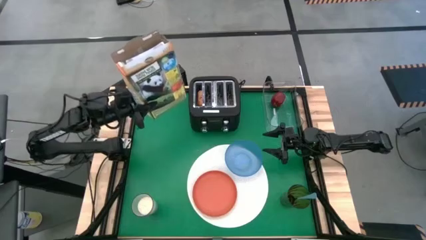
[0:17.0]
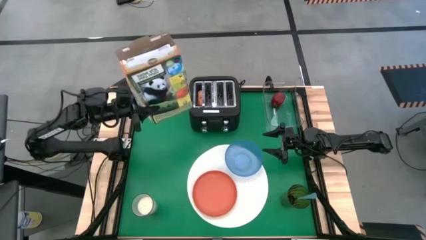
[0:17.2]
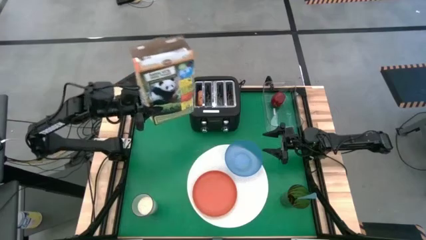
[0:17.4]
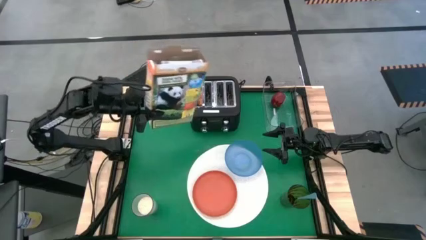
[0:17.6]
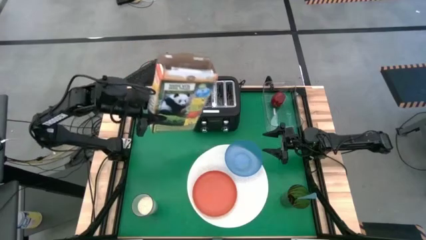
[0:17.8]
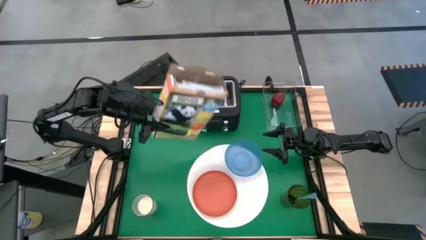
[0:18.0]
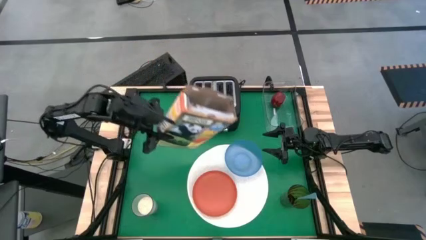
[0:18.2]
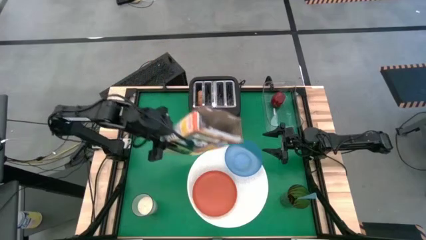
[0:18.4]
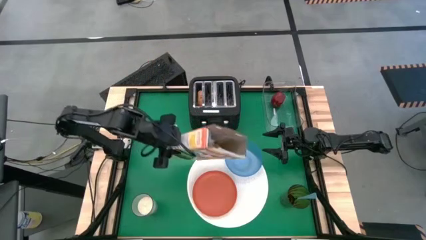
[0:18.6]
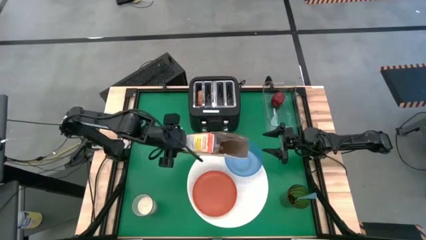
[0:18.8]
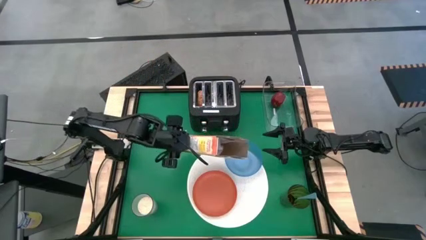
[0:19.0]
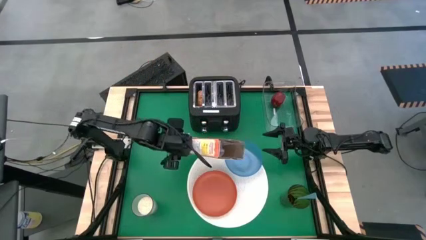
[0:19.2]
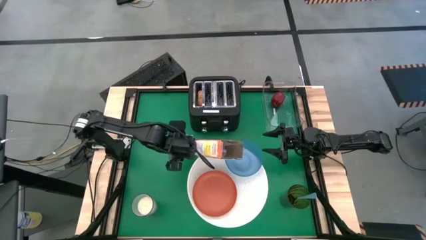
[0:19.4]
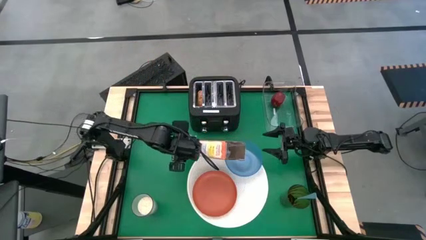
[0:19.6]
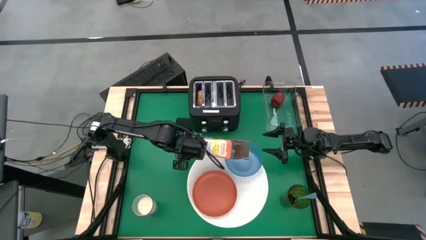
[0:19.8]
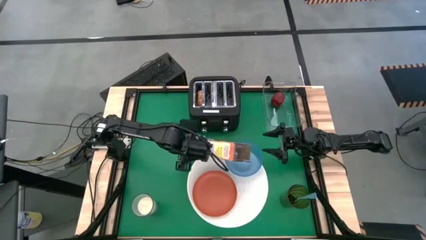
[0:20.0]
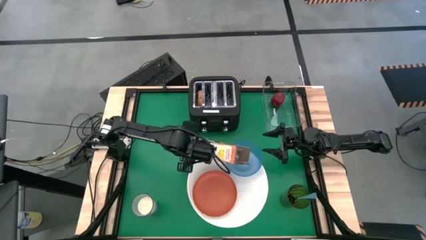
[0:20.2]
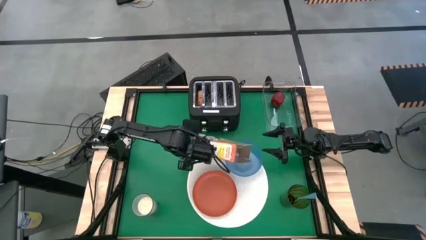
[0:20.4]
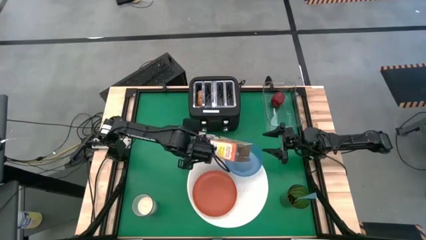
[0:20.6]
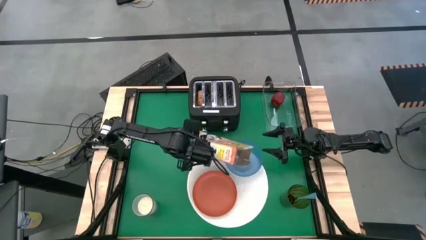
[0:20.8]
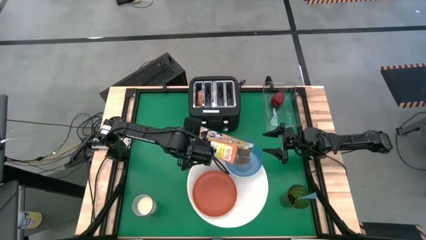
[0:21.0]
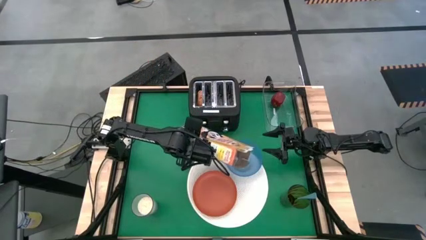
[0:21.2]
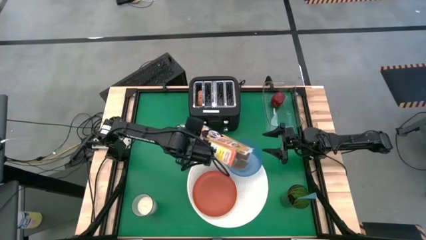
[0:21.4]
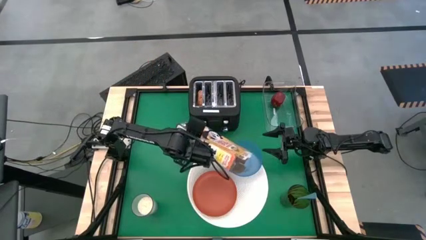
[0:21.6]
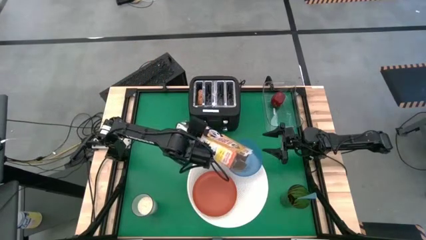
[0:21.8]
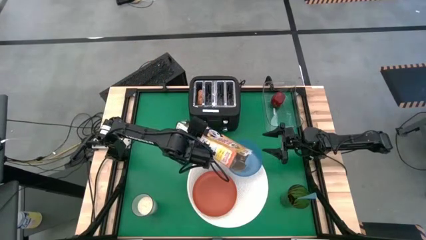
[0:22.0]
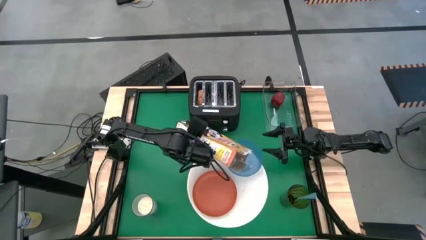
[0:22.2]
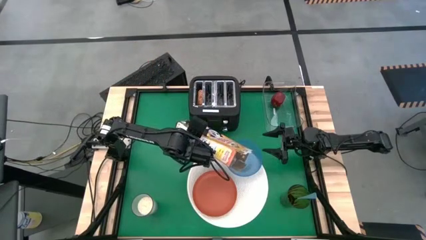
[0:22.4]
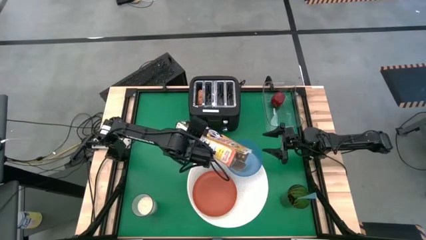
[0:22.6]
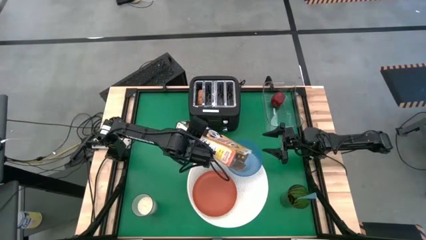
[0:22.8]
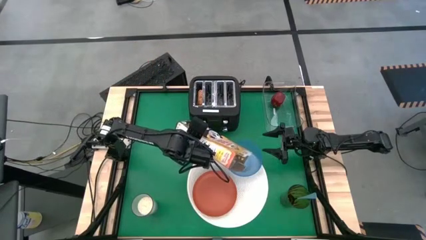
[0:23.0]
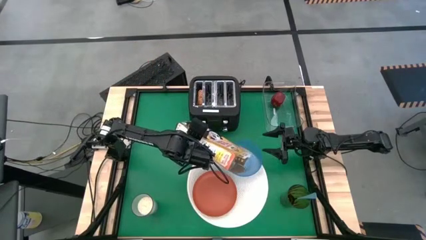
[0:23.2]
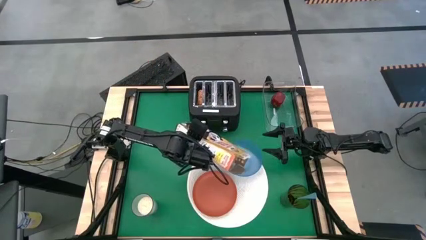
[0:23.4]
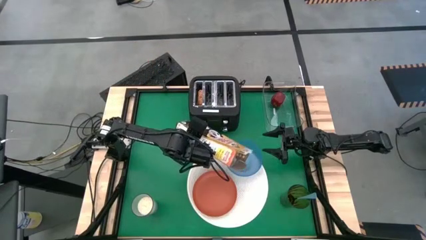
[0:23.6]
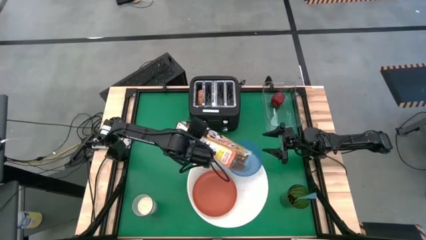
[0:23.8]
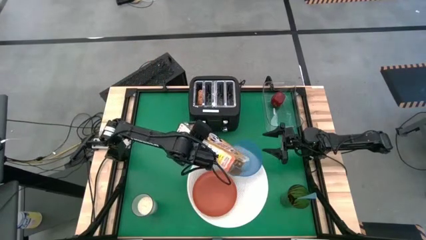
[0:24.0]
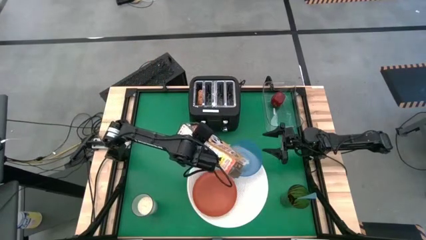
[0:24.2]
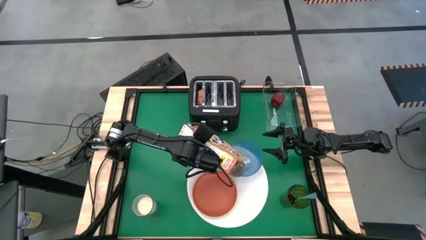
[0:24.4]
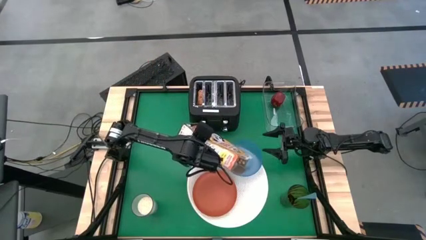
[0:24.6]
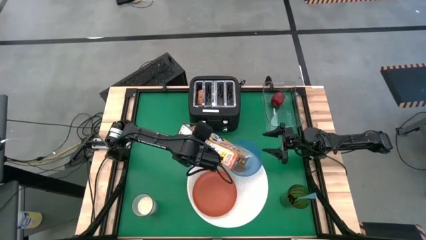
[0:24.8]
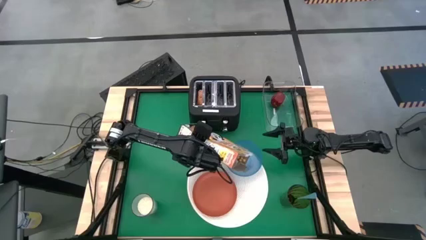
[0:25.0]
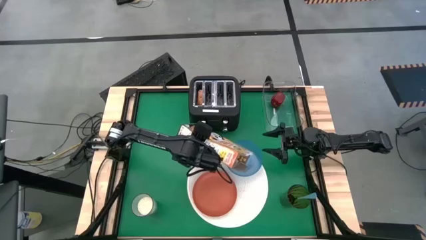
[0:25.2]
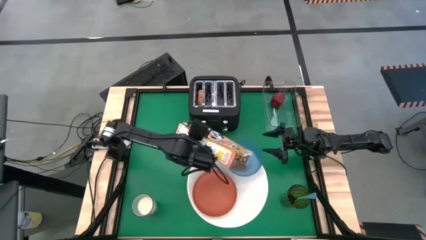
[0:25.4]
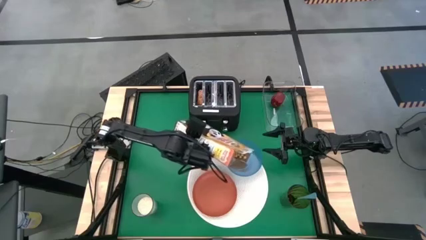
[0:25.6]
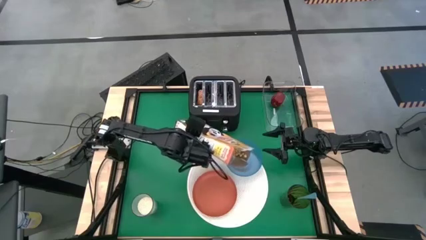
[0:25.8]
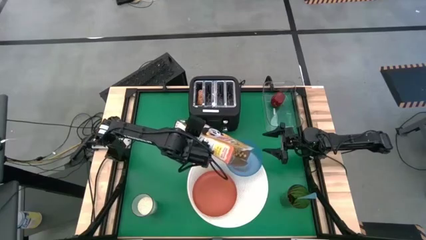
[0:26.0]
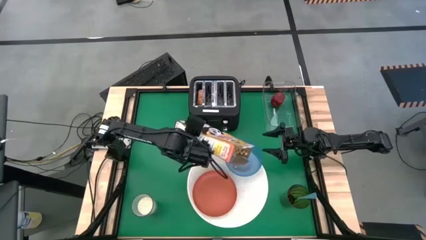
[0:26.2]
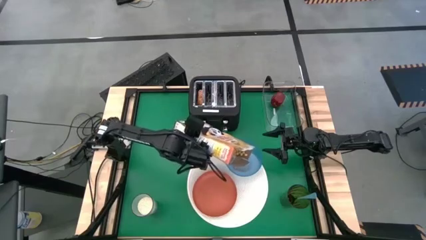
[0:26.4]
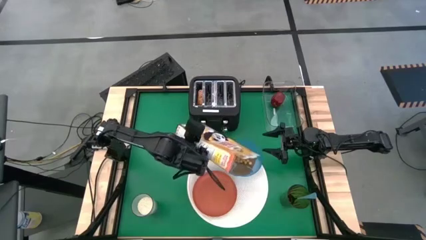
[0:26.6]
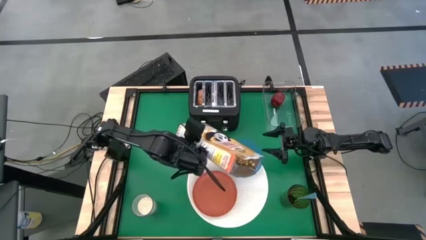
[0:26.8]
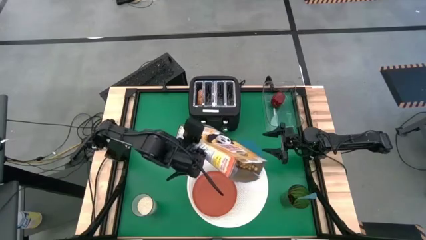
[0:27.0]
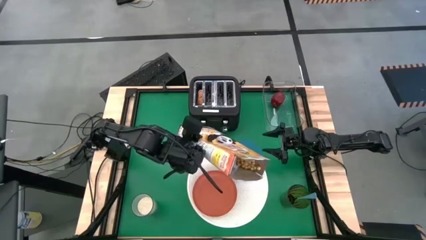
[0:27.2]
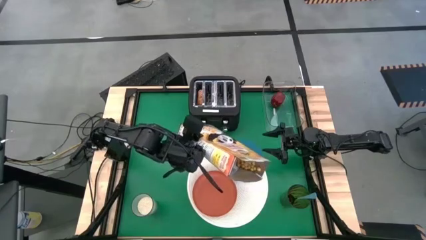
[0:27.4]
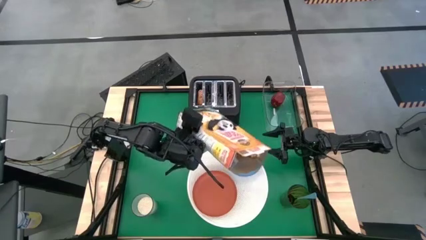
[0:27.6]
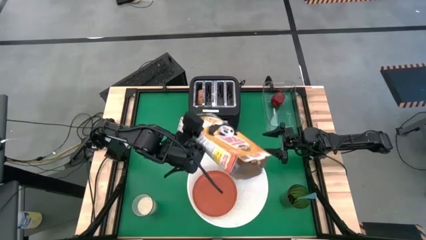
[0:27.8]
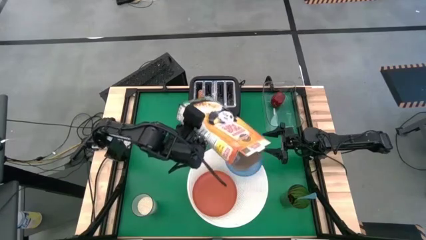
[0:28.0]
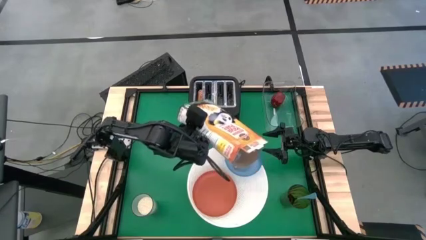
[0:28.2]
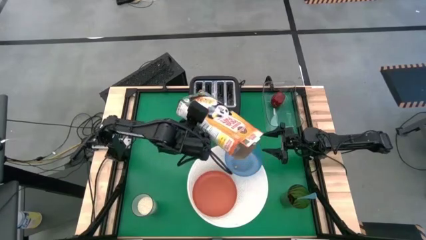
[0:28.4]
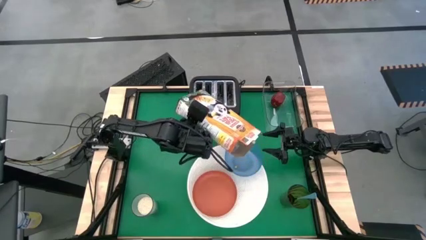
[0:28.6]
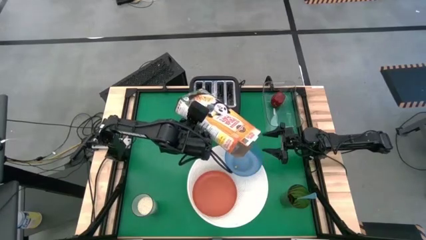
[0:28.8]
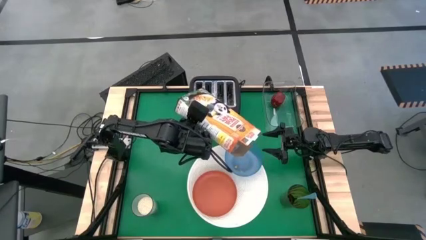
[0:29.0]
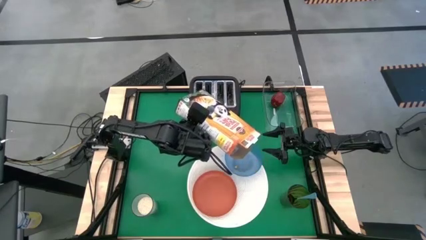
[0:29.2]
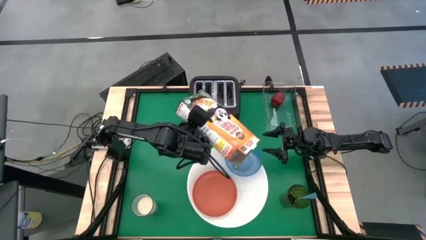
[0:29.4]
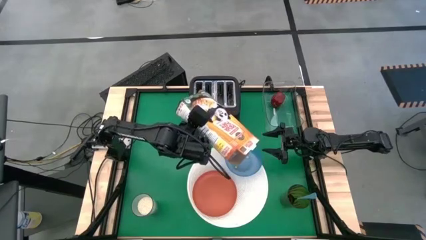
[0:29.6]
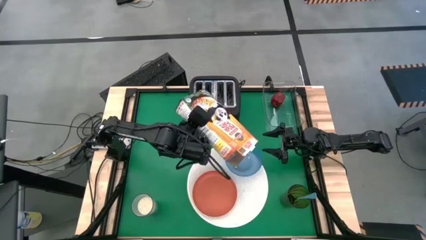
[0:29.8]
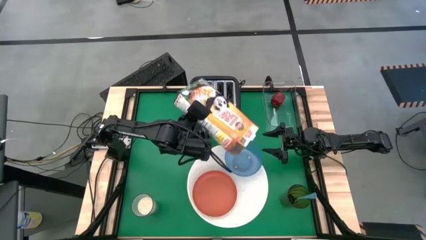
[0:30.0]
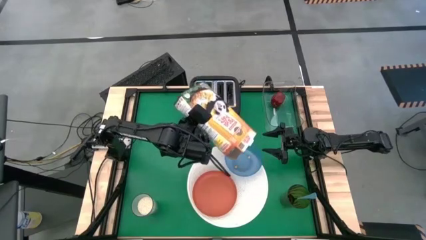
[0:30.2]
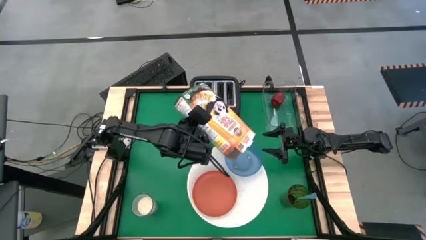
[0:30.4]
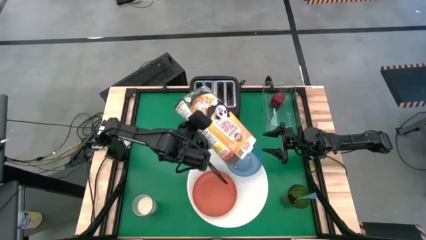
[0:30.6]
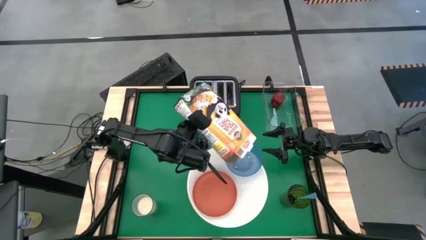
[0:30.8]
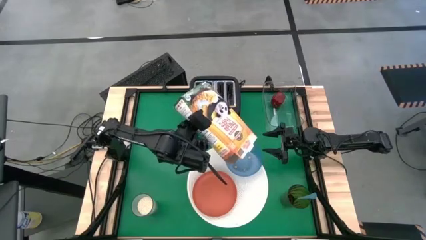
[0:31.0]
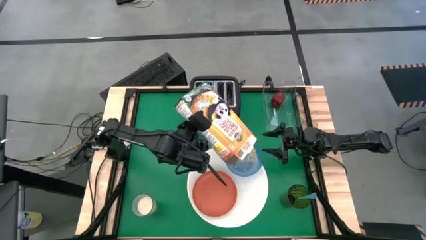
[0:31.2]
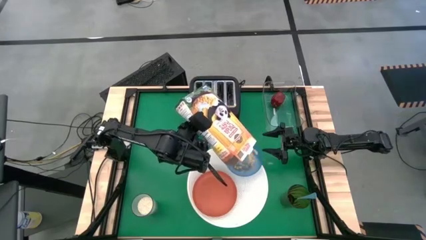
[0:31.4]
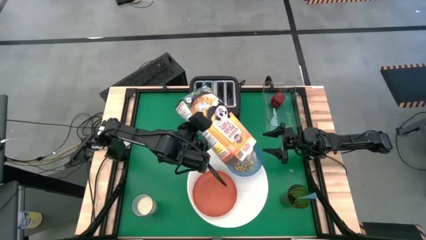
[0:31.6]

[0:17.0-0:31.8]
Task: Arrange a breakfast setting
Pour the cereal into the blue bowl
